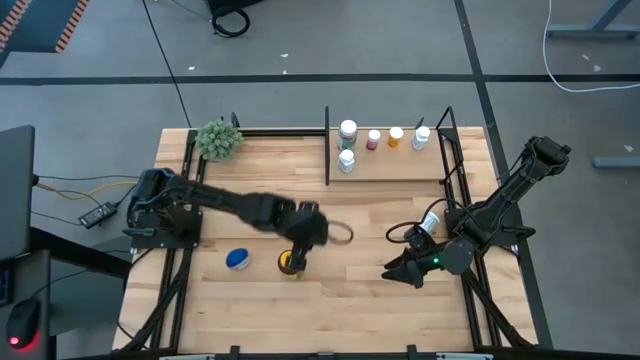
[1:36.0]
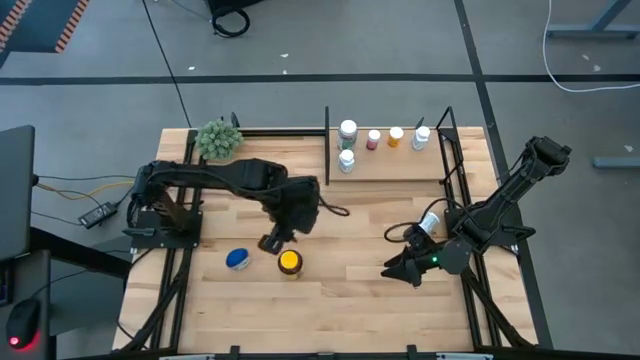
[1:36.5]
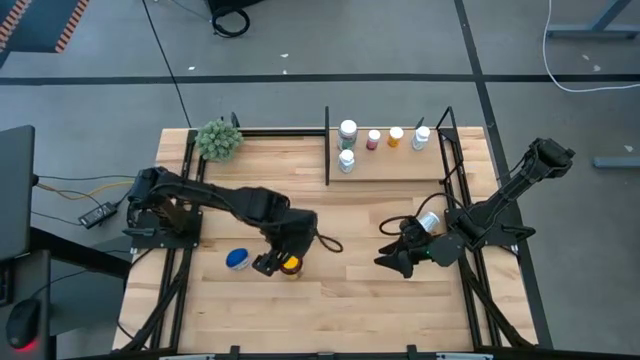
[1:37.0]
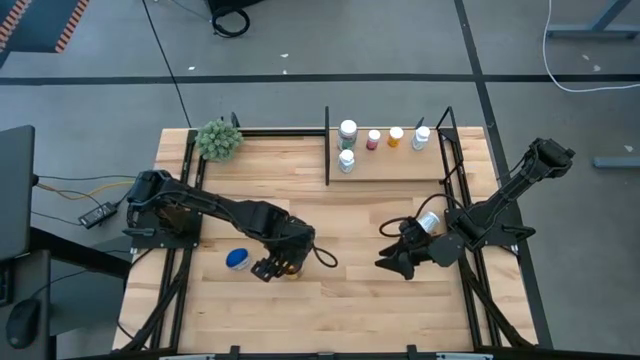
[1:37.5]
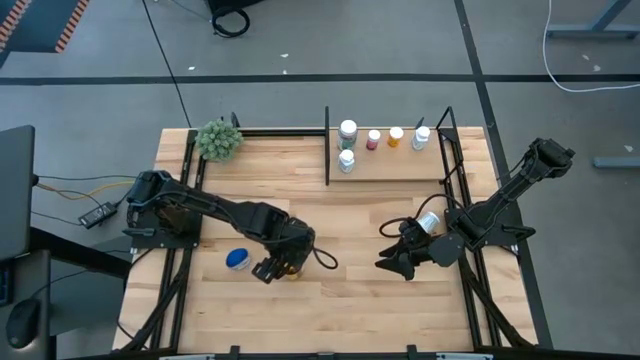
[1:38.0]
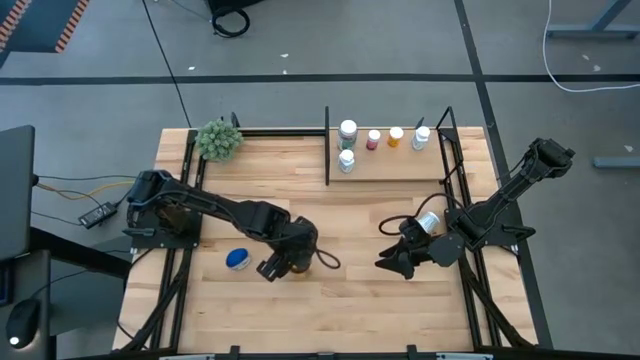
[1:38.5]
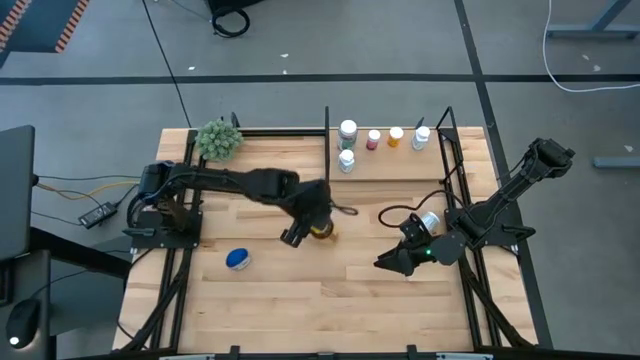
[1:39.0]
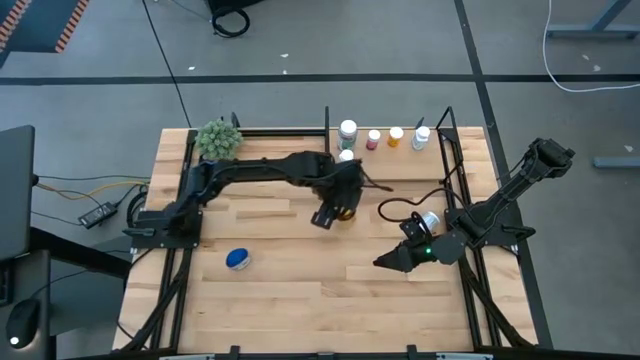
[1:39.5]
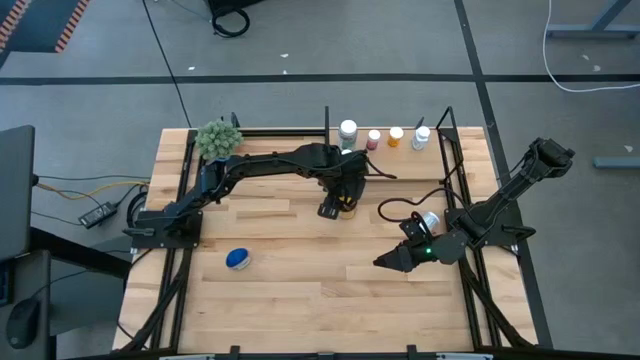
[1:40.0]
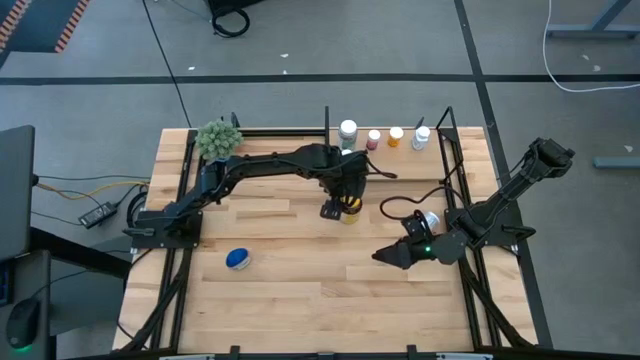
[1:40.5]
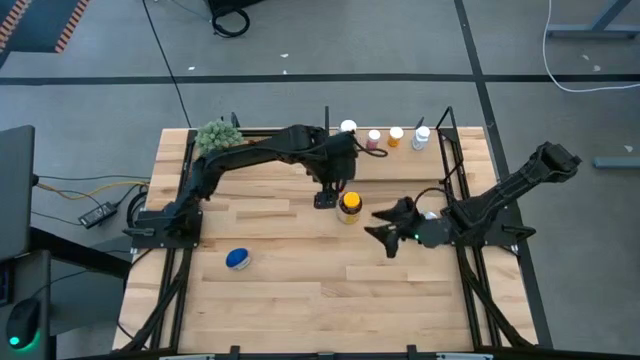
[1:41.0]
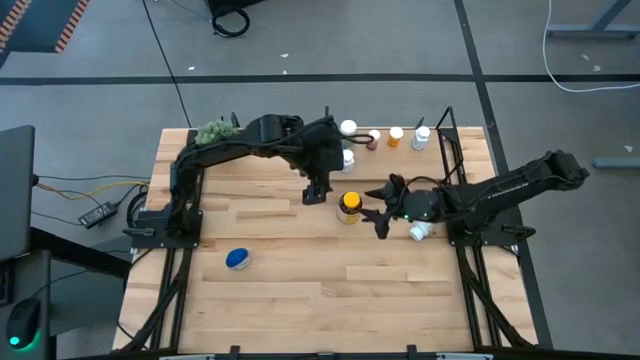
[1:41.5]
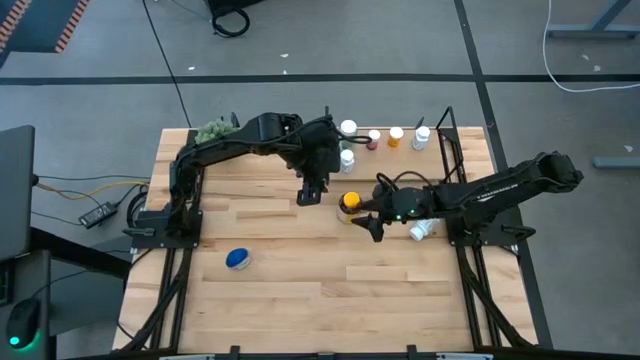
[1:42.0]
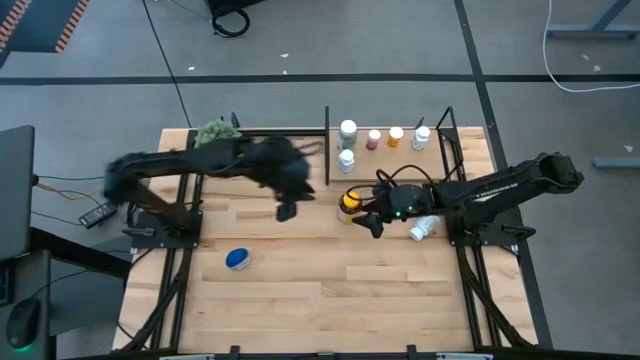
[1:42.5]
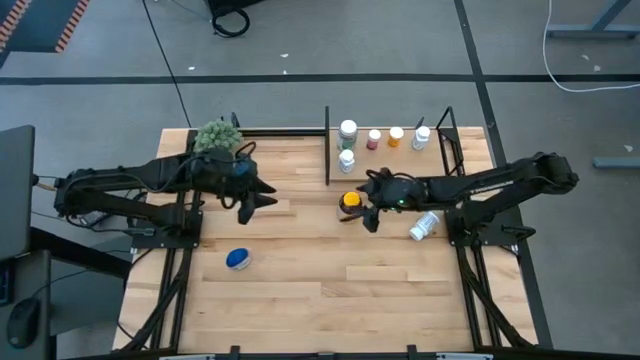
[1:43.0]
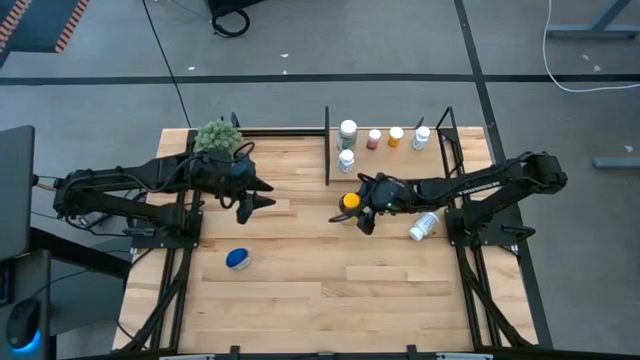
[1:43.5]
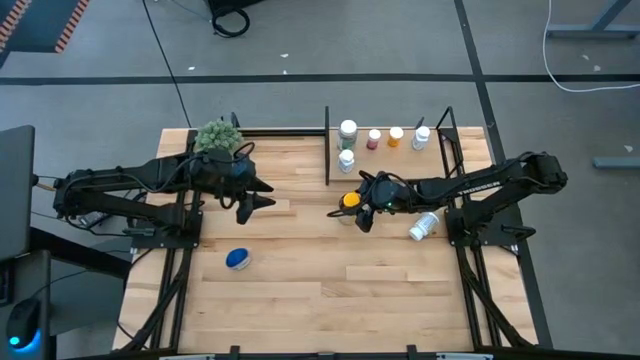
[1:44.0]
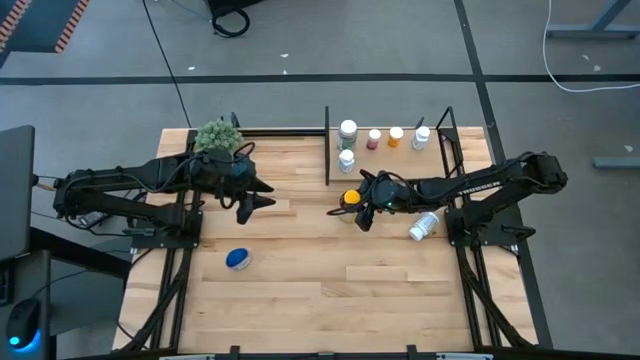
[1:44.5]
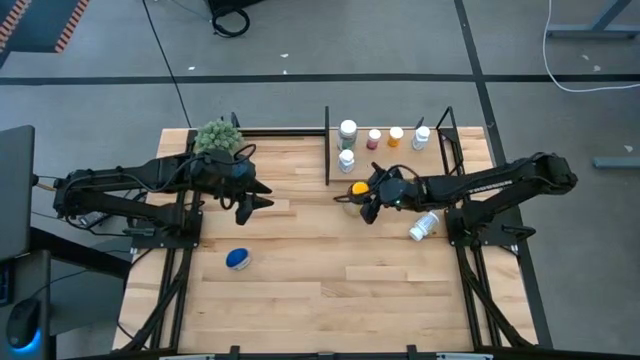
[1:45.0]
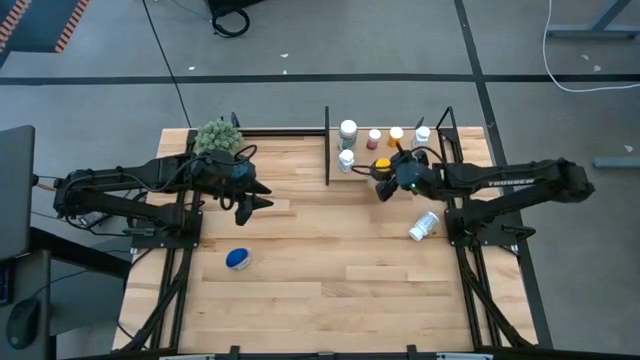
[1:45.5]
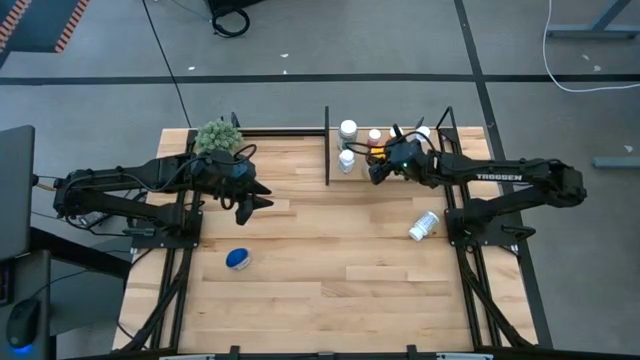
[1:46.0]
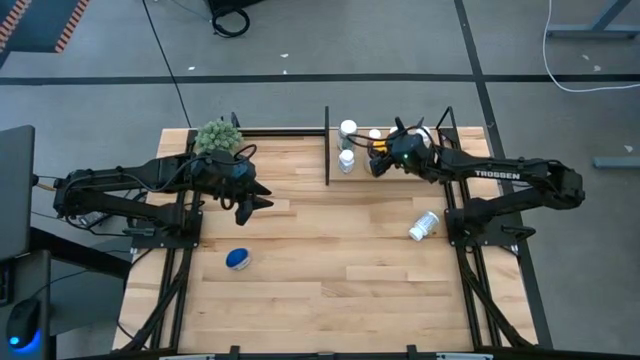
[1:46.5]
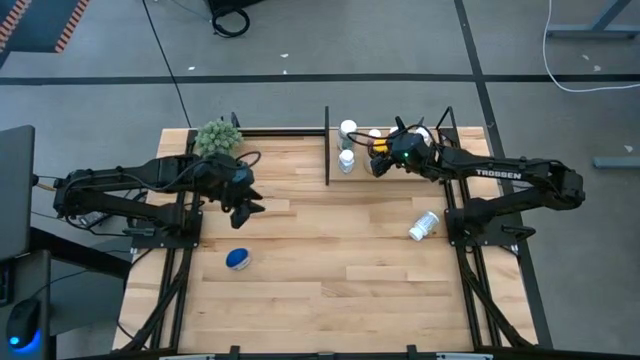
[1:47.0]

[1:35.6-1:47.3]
Task: Pick and place medicine bottles onto shelf by color
Put the yellow pill bottle on the shelf

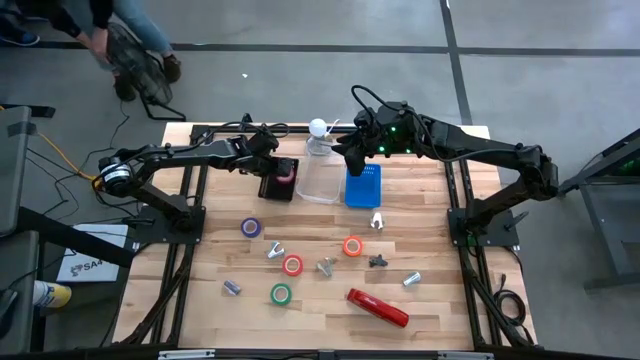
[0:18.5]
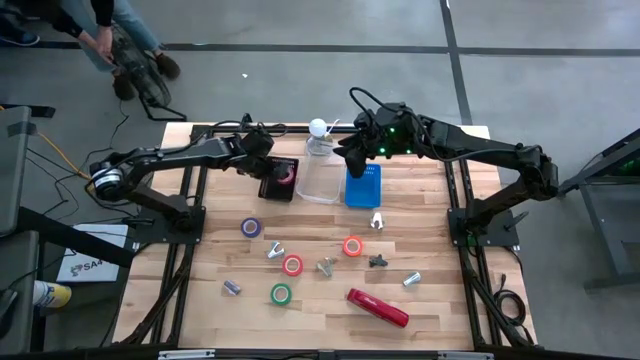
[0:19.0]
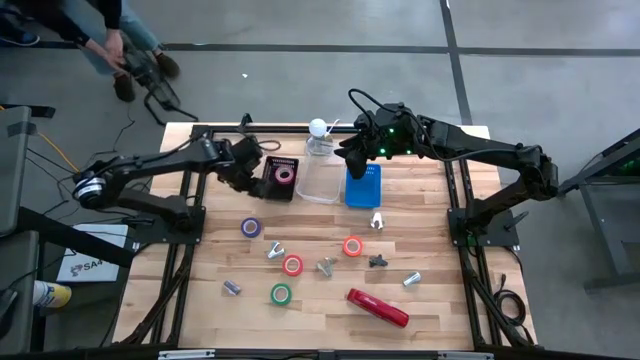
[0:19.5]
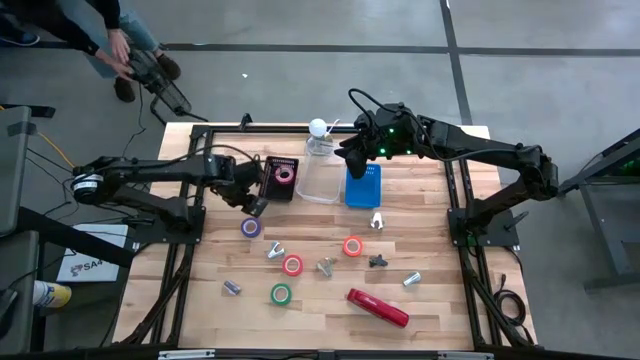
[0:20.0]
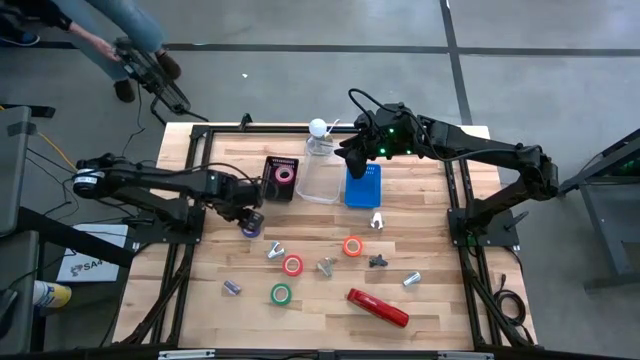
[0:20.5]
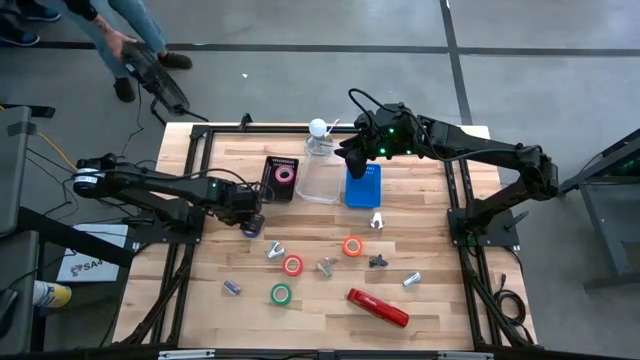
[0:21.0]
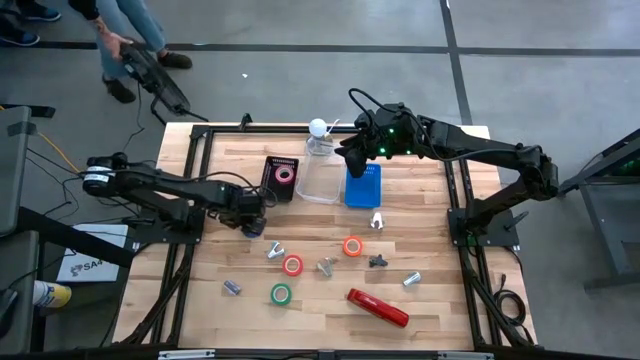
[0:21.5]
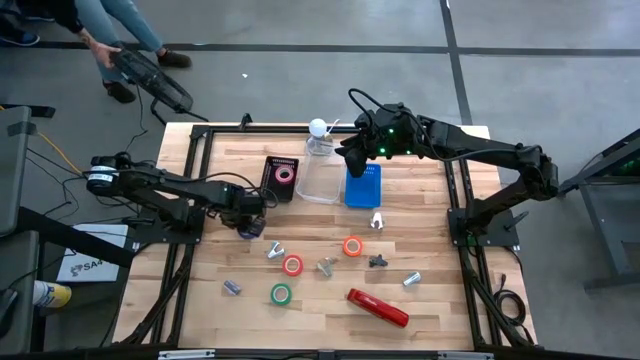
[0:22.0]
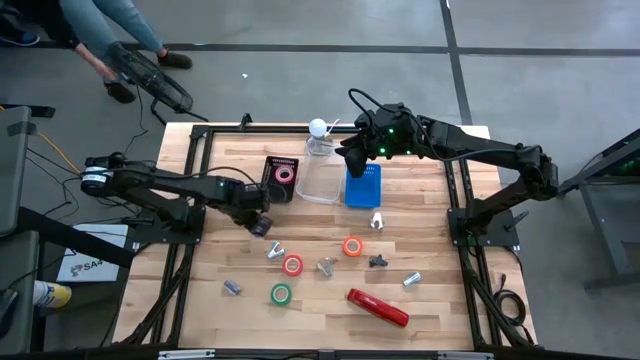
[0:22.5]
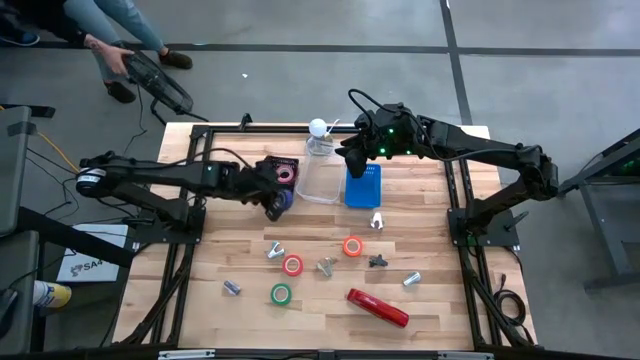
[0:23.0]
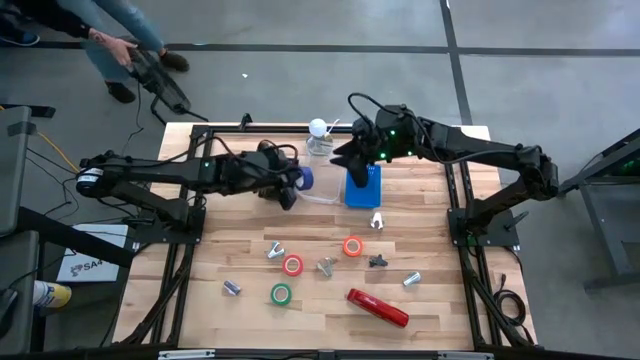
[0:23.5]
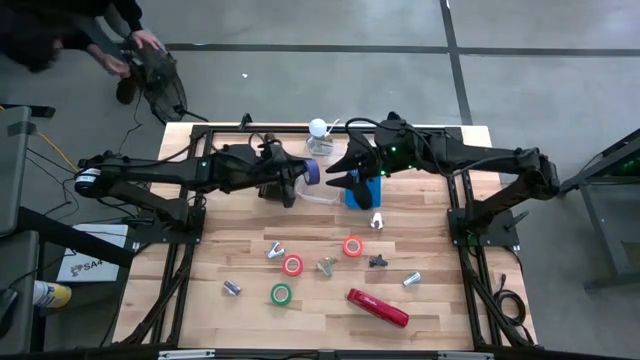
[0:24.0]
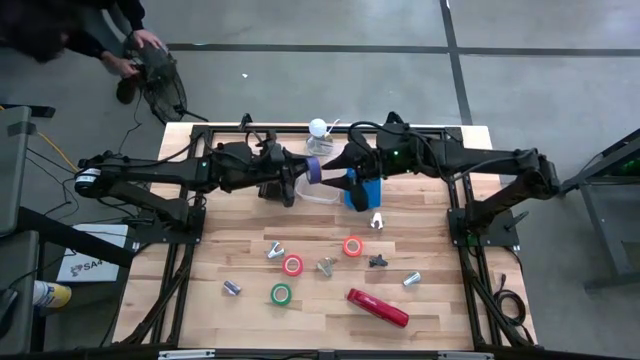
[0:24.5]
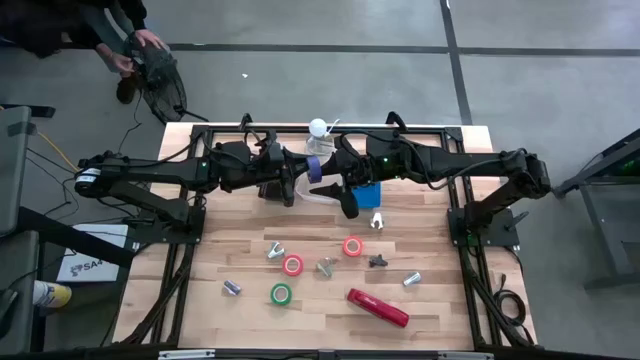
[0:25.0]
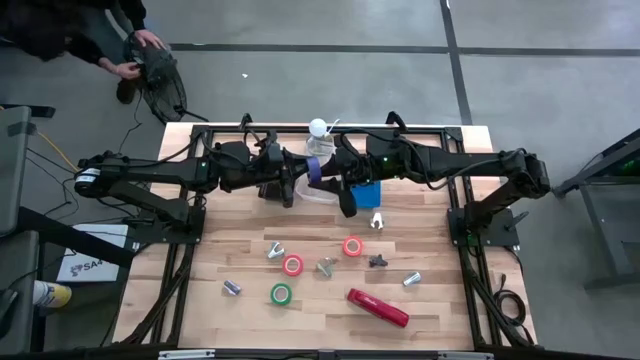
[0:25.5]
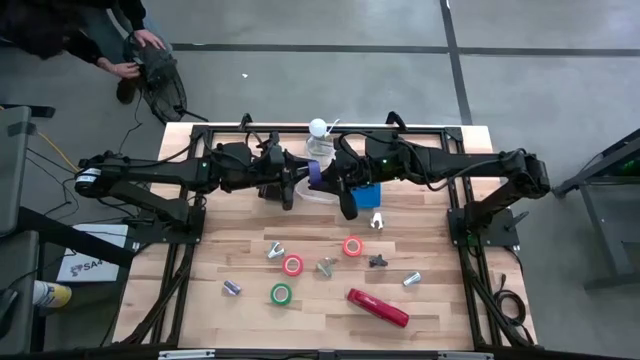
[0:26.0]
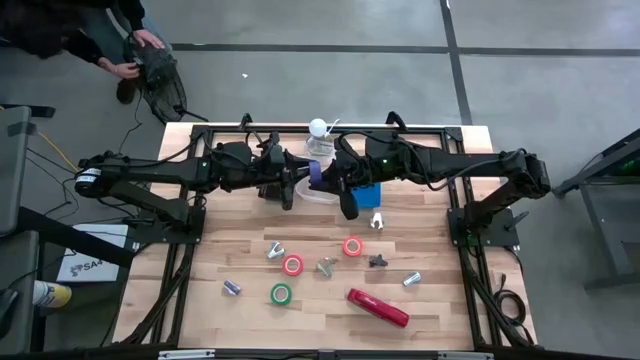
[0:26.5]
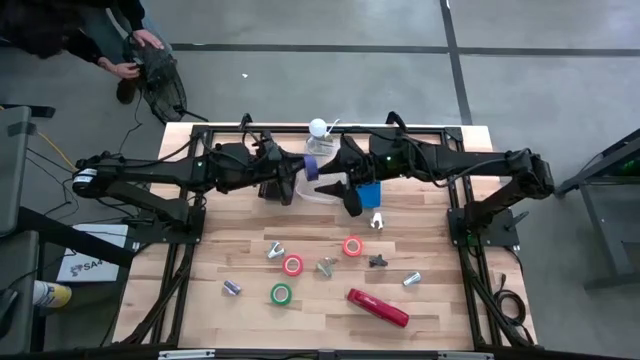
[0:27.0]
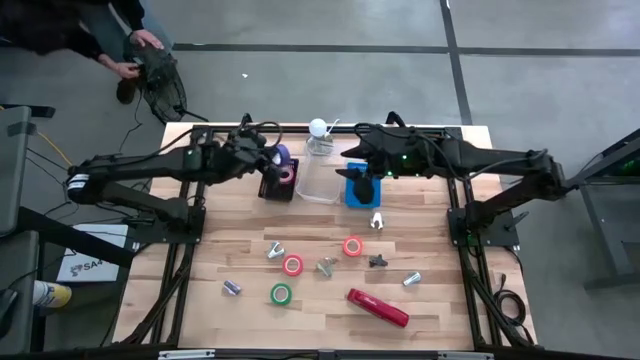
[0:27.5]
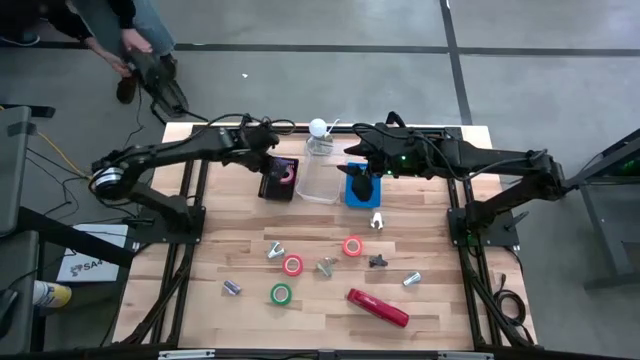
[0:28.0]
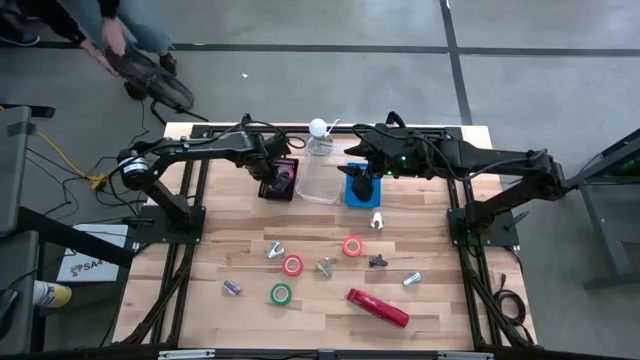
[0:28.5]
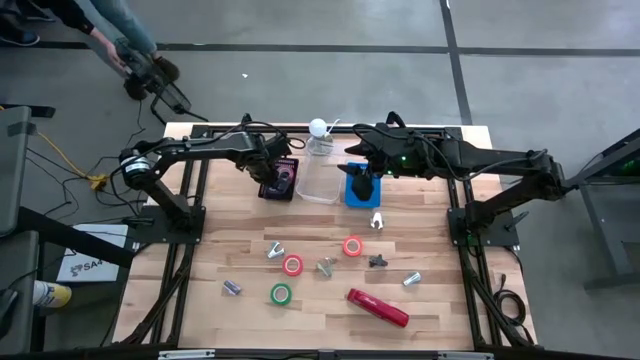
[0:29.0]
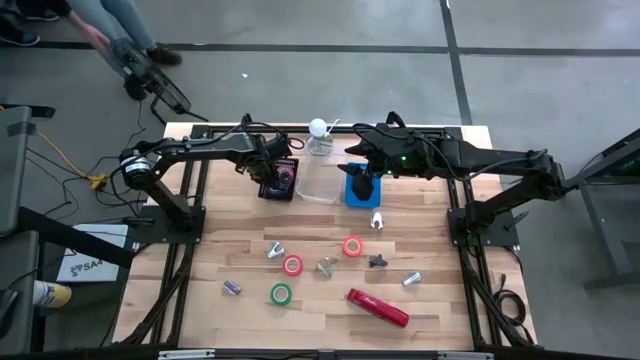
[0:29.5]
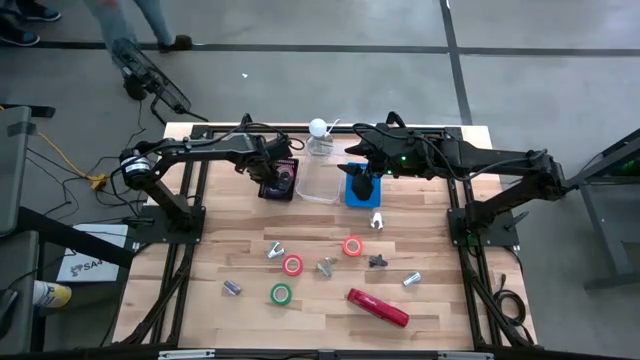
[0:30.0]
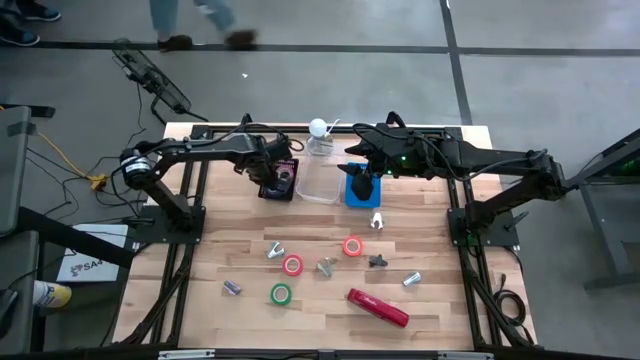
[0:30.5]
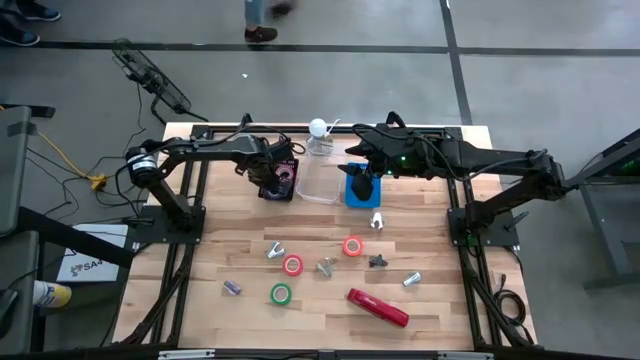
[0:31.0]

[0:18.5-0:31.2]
Task: Pick and place Stapler, Stapler remover, tape
Put the blue tape into the black basket
